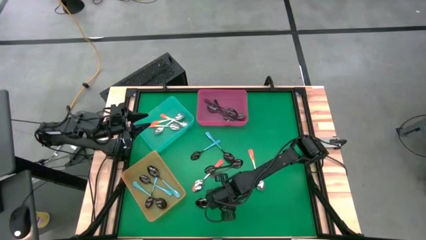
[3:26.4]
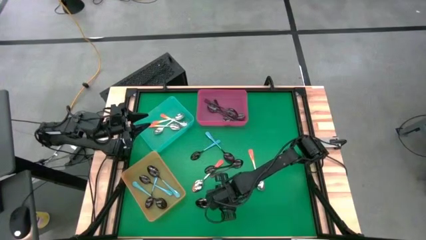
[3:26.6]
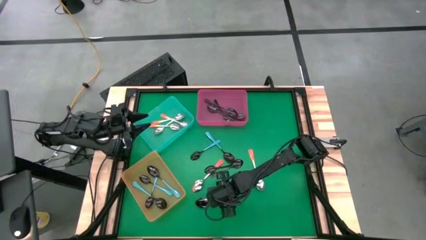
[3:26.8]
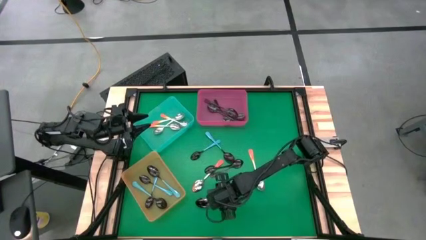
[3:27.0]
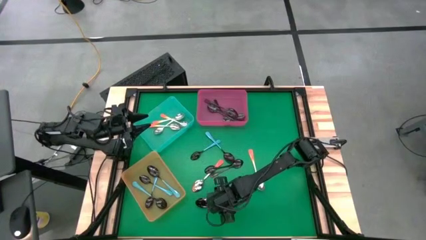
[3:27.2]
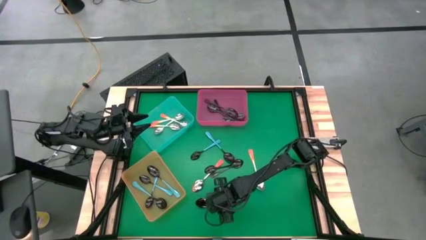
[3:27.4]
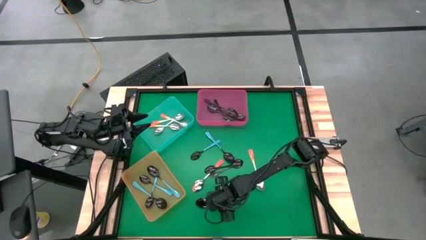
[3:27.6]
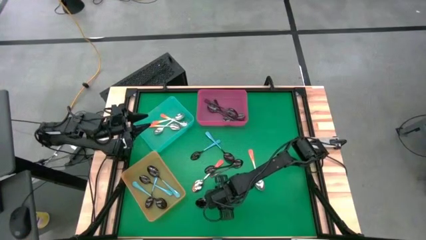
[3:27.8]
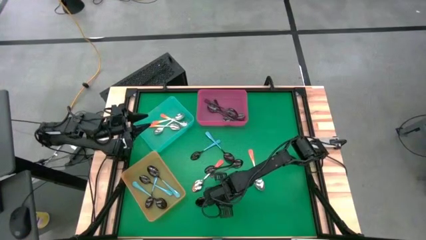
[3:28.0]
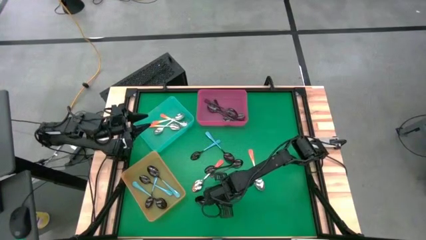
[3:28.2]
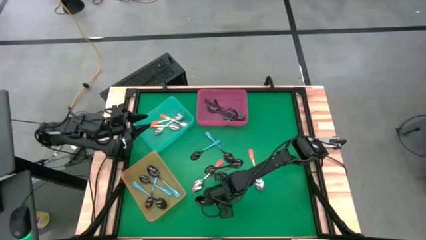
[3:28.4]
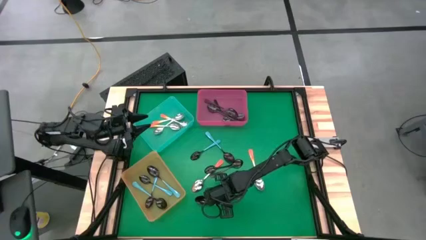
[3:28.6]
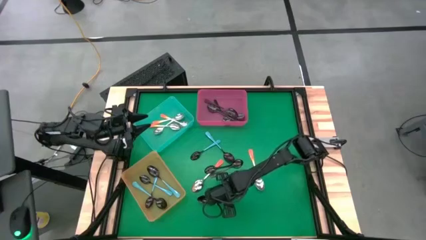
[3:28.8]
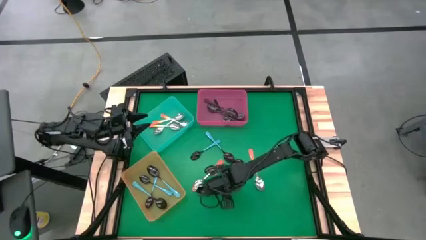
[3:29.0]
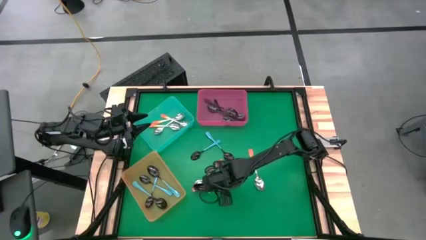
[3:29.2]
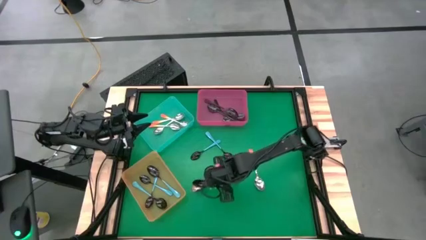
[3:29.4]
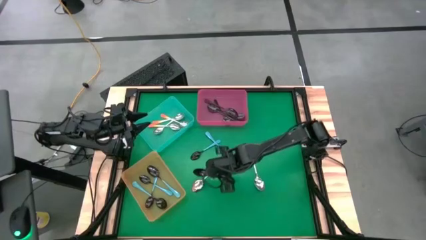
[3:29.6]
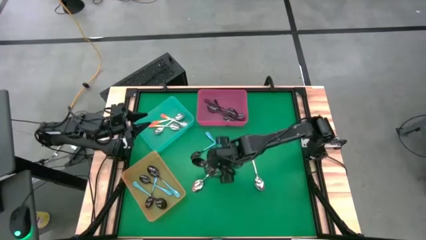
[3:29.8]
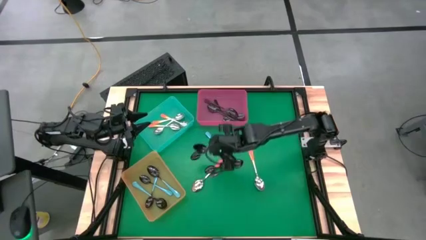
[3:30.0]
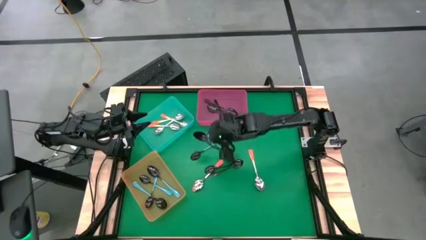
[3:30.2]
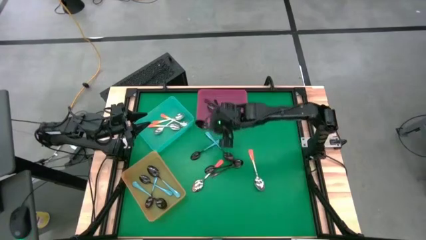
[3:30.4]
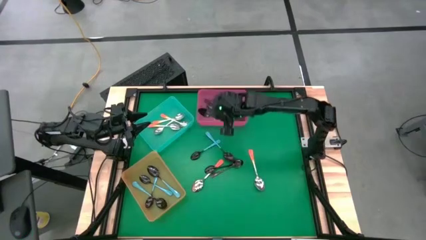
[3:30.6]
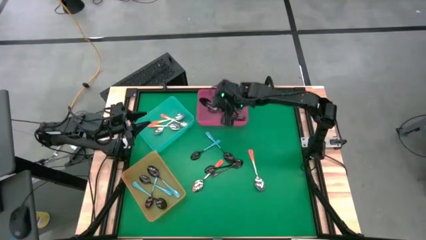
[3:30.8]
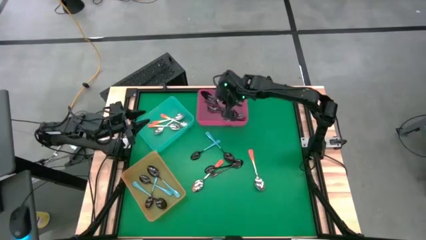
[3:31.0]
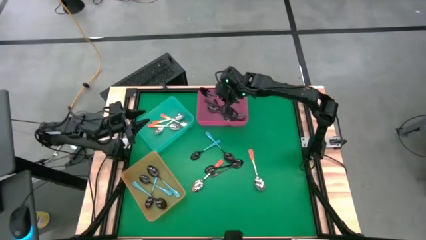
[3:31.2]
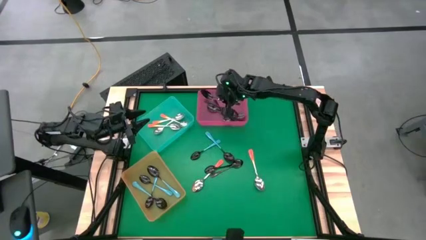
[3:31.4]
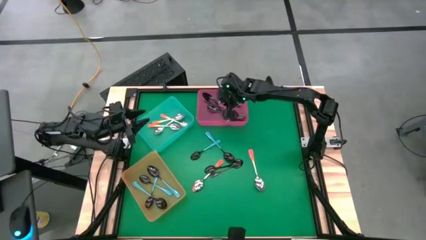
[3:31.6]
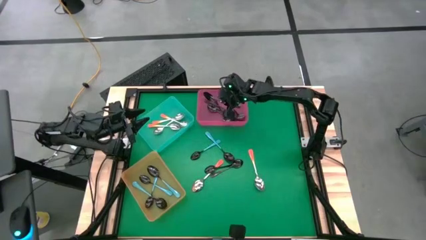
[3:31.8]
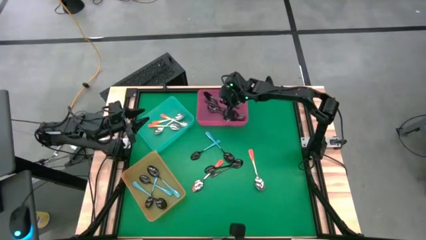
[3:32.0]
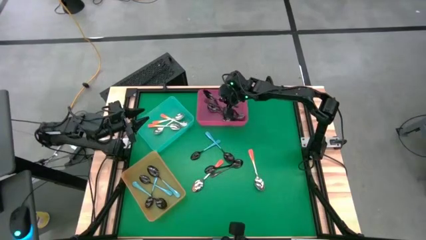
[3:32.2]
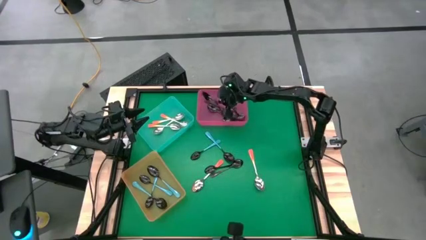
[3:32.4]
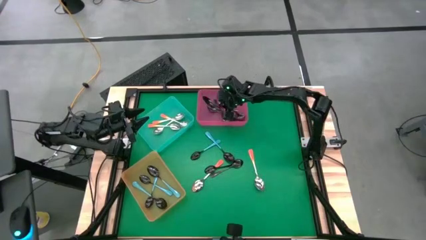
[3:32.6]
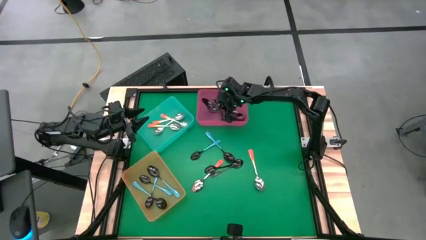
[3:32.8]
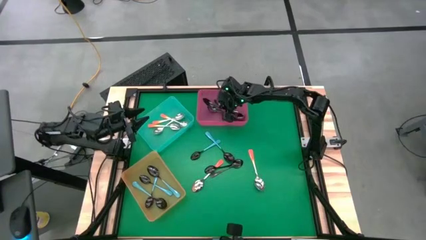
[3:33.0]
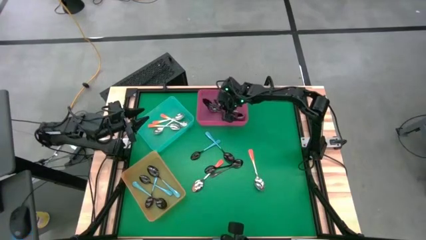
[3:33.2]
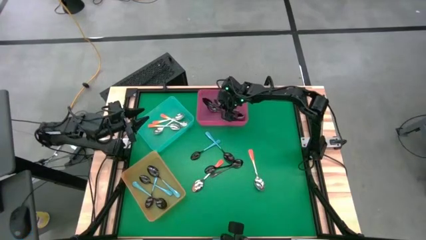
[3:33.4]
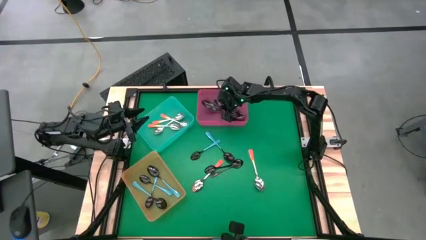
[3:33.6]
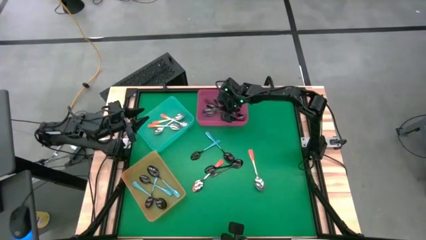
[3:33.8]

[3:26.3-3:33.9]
Task: Sort silverware by color (type)
Put the black spoon into the pink bin

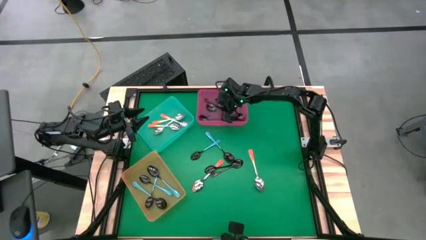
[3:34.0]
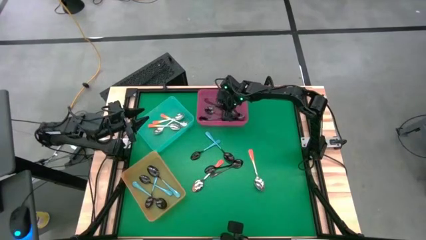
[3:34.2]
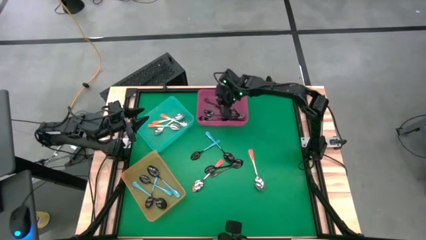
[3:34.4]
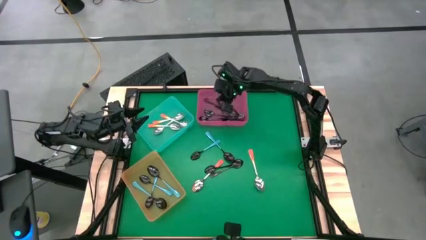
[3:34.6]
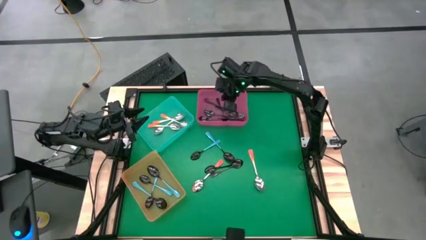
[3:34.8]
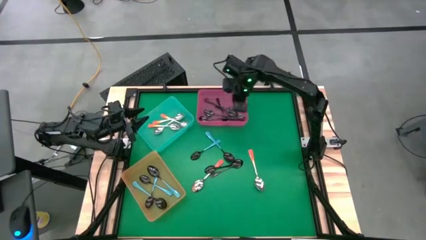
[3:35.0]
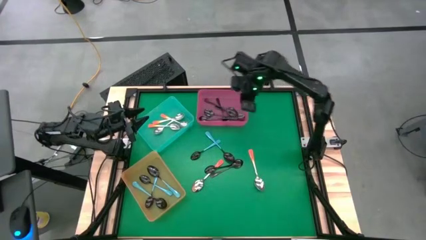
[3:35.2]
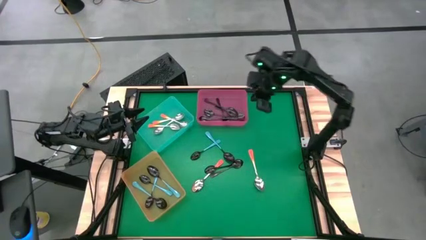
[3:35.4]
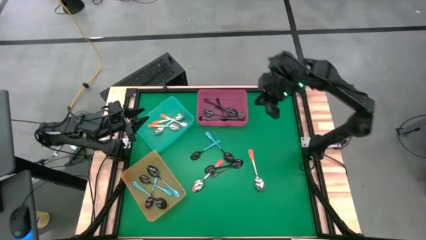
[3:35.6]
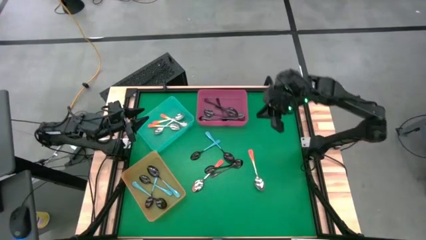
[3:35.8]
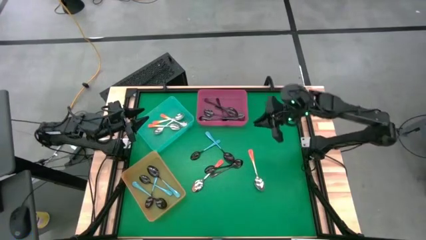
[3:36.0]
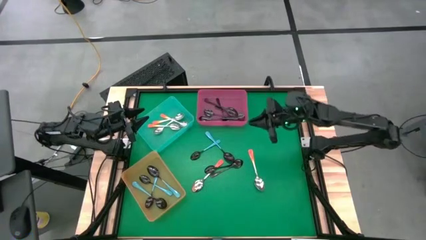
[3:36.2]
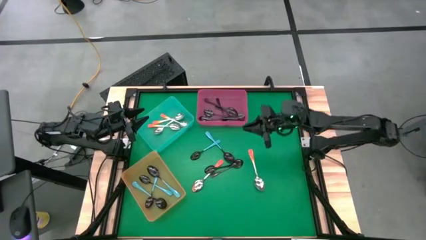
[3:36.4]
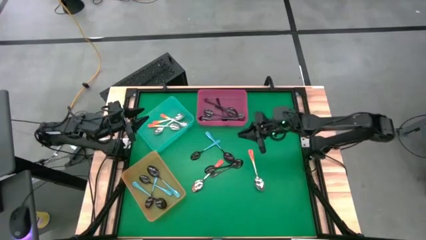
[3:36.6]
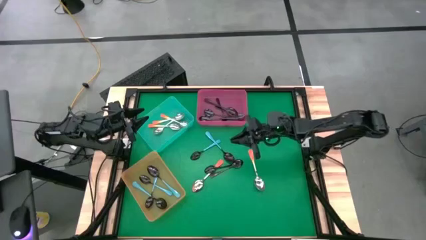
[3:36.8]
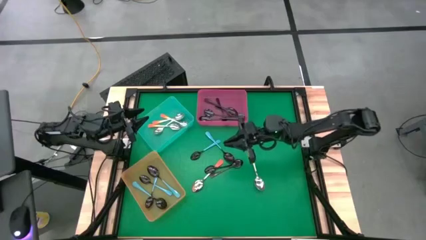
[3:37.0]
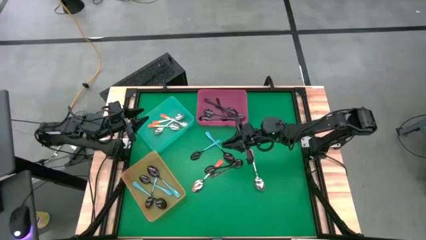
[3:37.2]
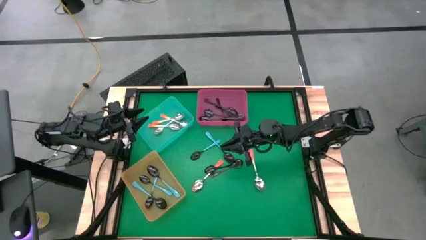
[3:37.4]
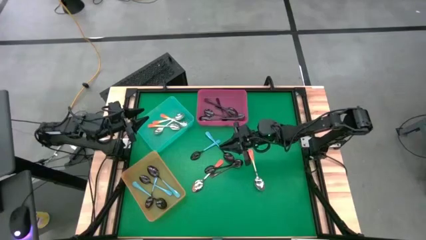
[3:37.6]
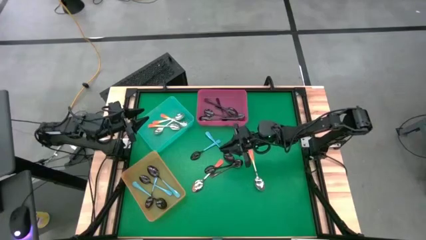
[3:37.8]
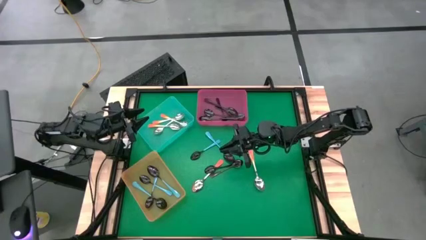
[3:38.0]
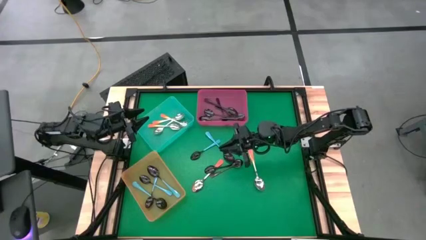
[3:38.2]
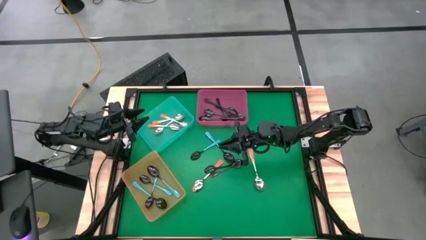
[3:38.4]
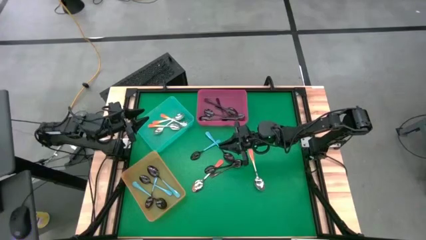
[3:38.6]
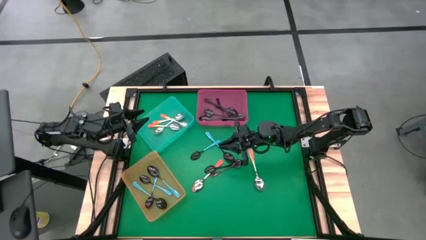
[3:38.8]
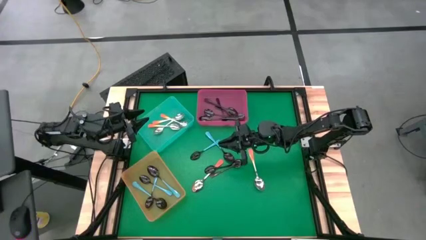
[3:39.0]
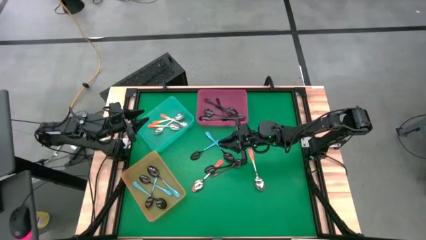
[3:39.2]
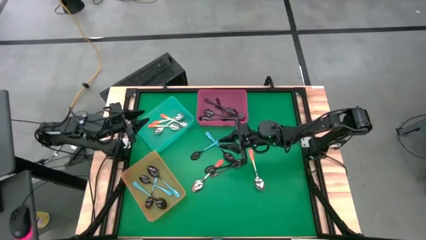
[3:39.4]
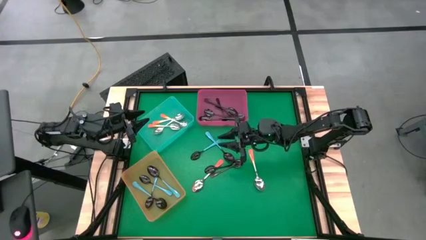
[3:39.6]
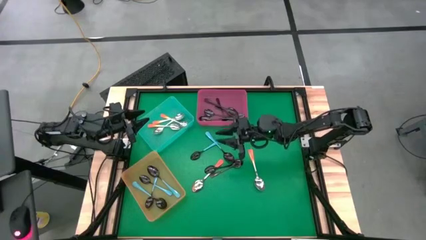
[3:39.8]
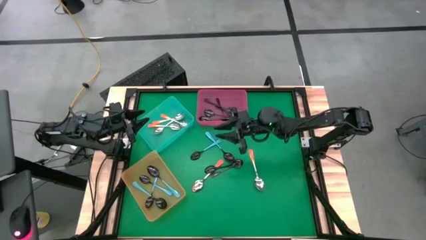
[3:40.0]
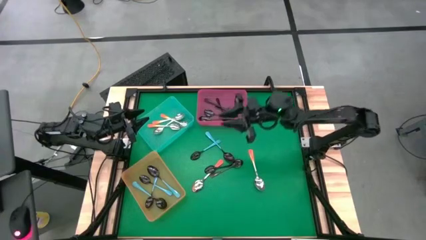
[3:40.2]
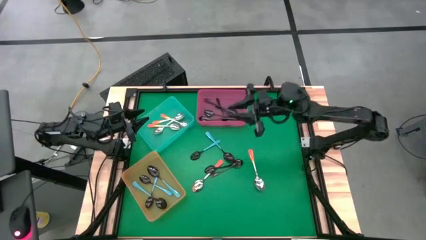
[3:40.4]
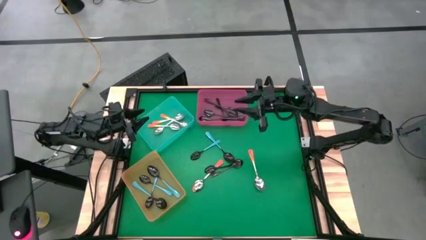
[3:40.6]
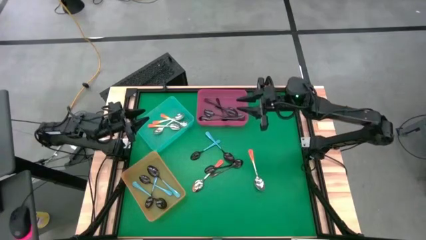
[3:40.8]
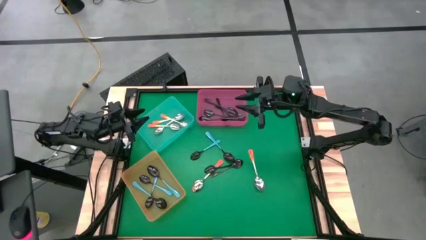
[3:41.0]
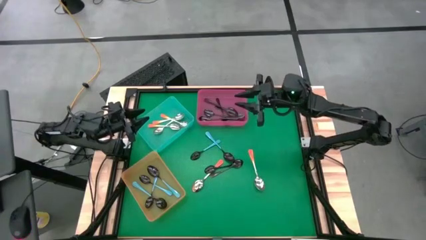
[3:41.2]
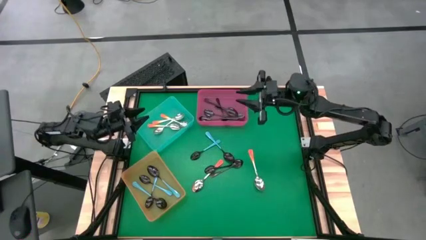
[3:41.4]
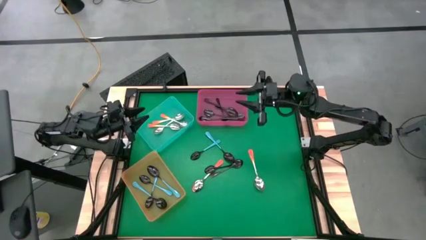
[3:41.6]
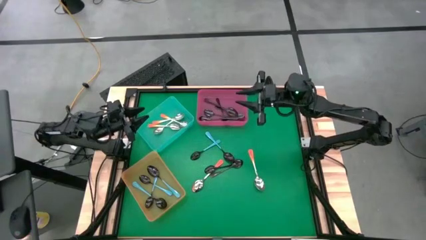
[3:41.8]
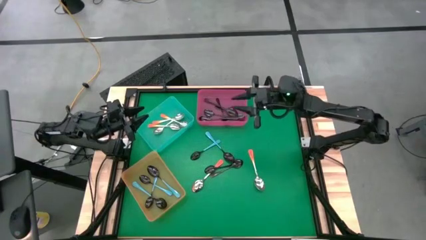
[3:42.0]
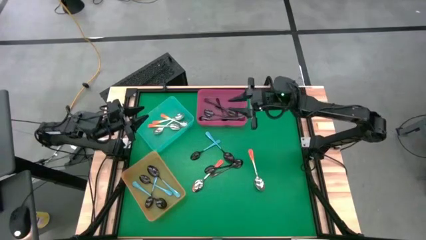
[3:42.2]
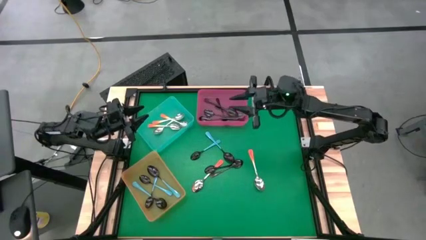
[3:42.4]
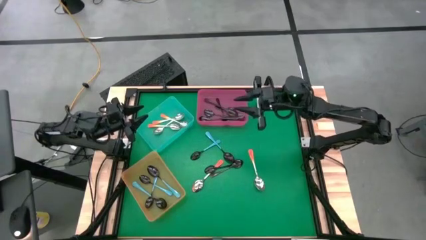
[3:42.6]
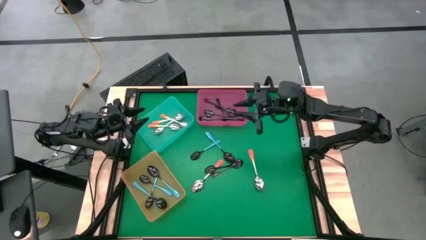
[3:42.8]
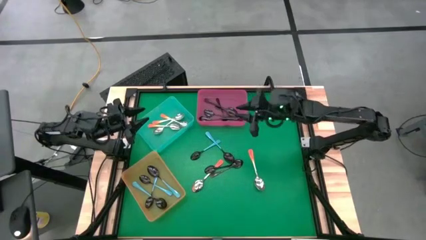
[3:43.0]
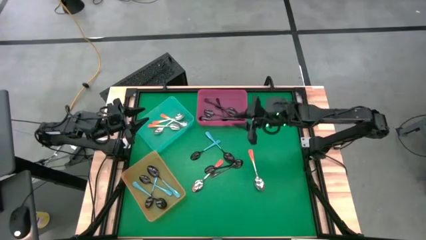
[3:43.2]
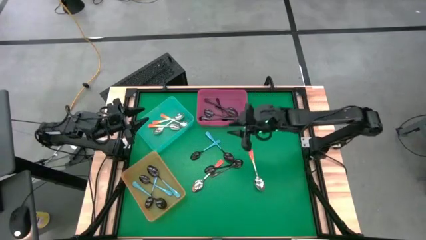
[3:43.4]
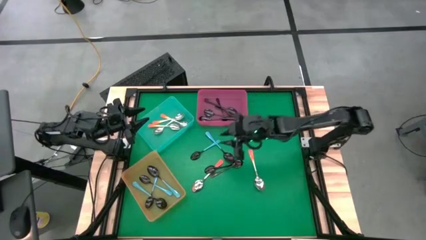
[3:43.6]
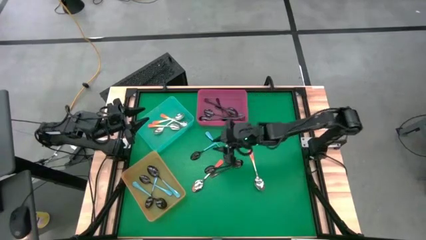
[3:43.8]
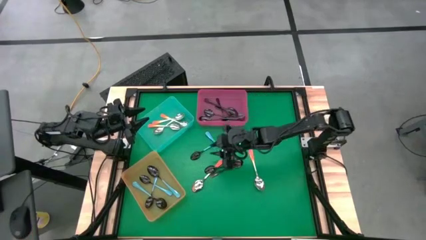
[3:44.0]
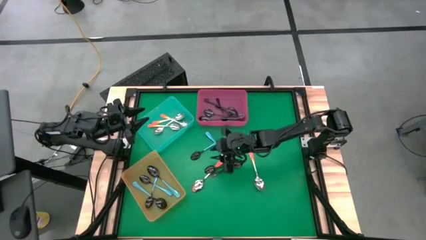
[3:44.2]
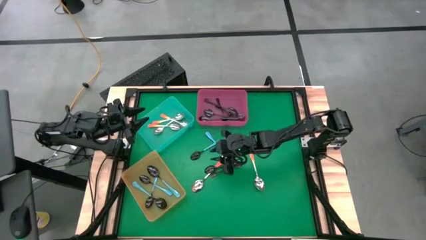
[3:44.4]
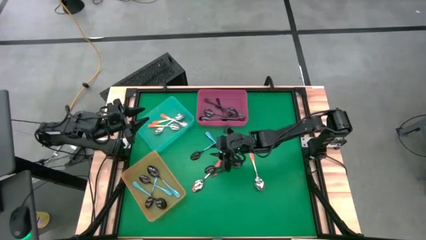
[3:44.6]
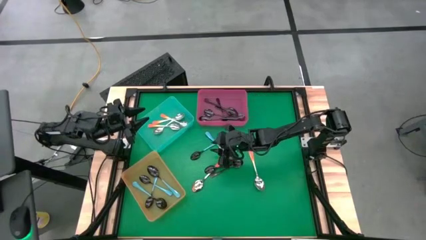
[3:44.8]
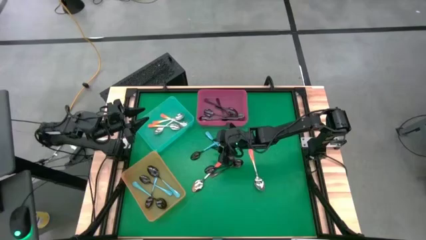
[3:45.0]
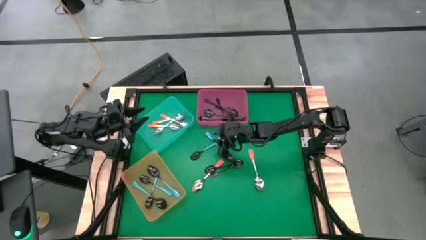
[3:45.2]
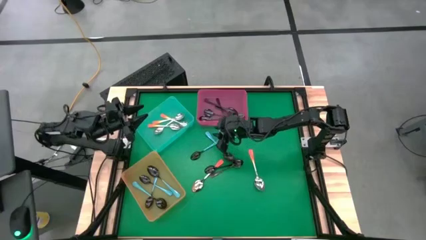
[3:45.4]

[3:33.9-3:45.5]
Put the orange spoon into the blue bin
